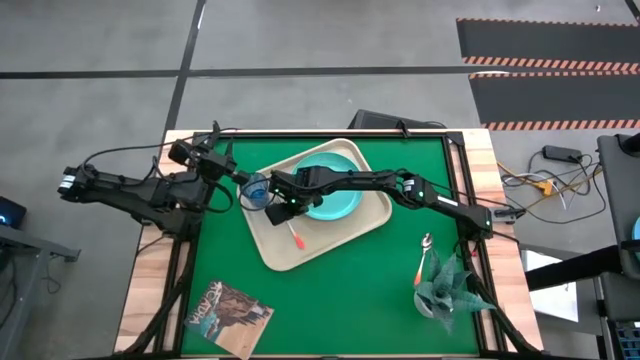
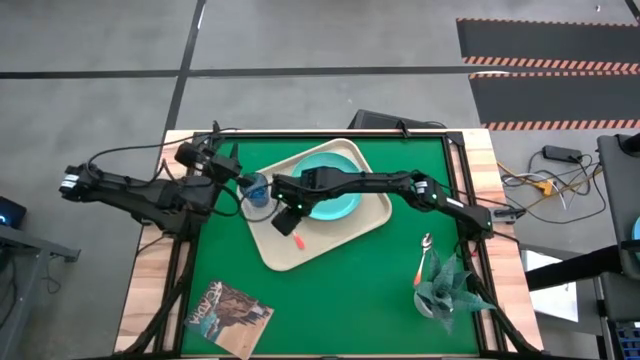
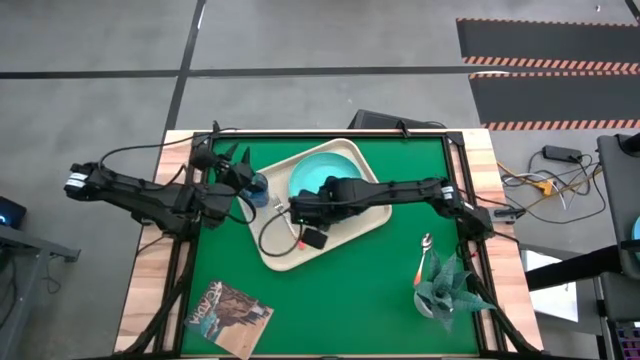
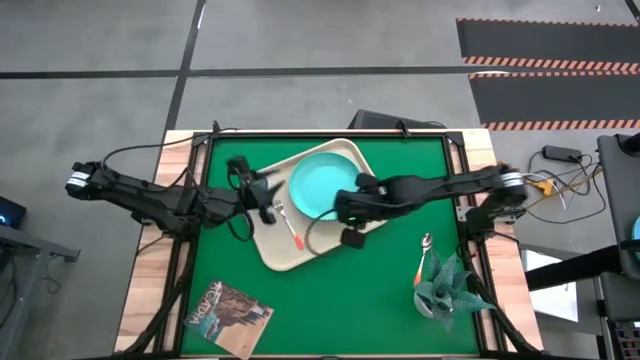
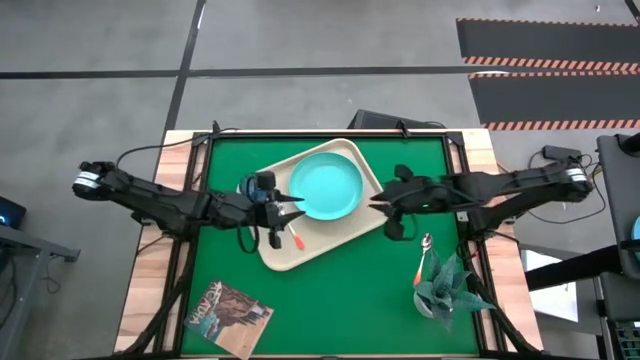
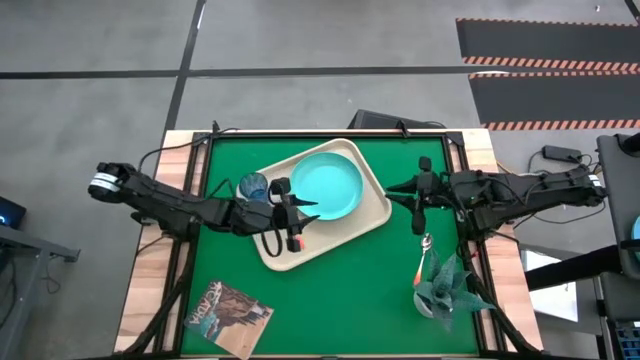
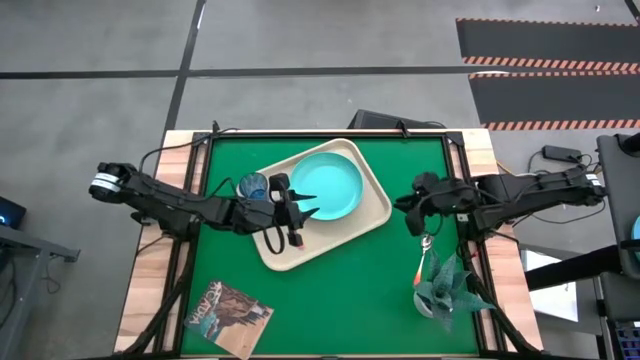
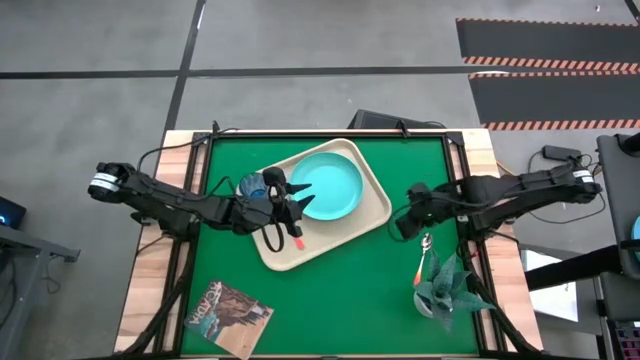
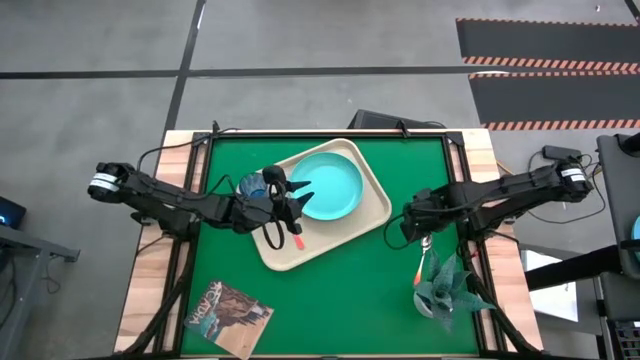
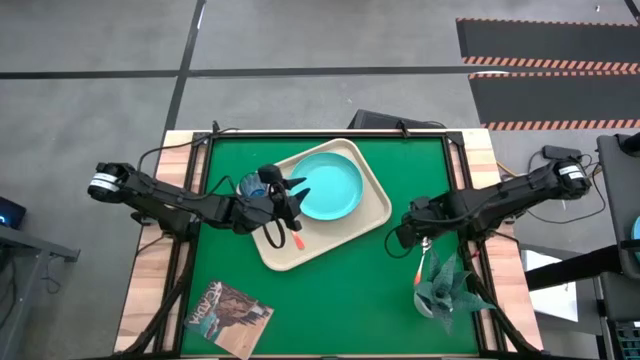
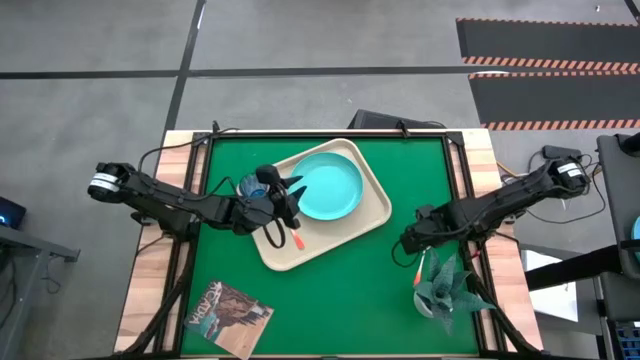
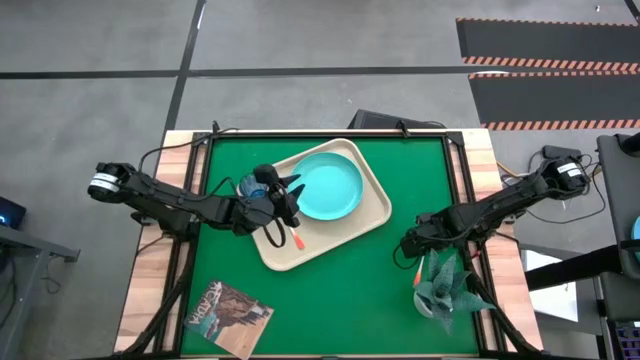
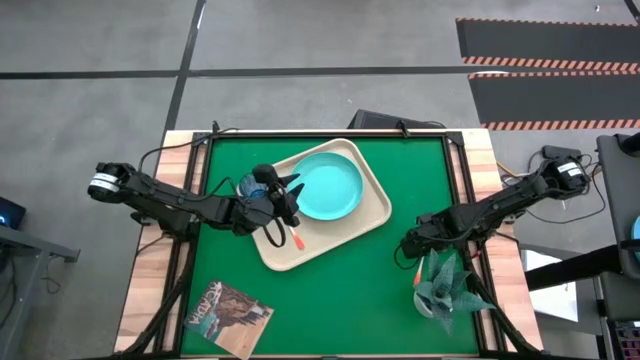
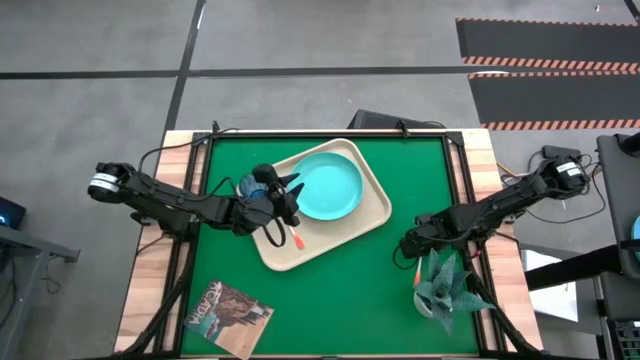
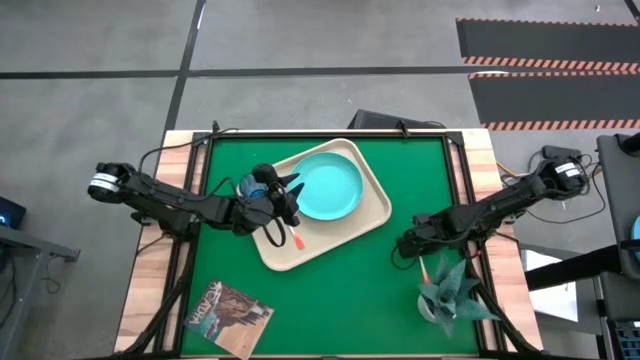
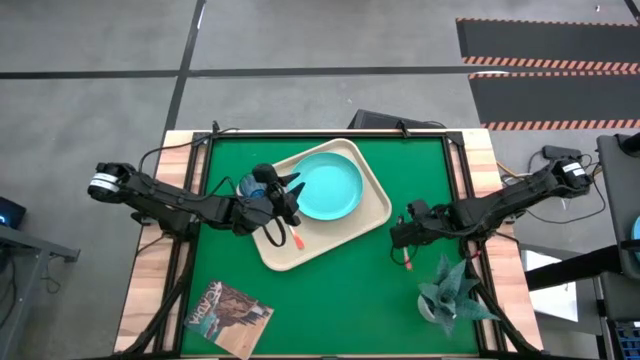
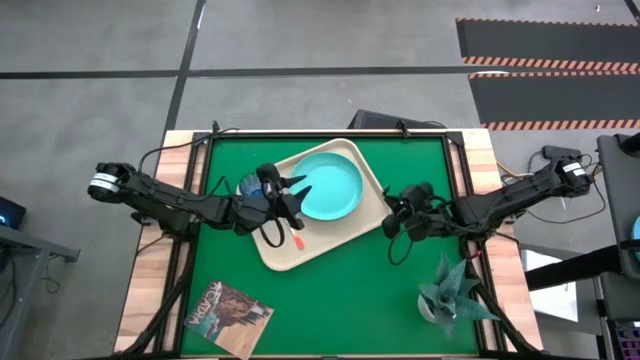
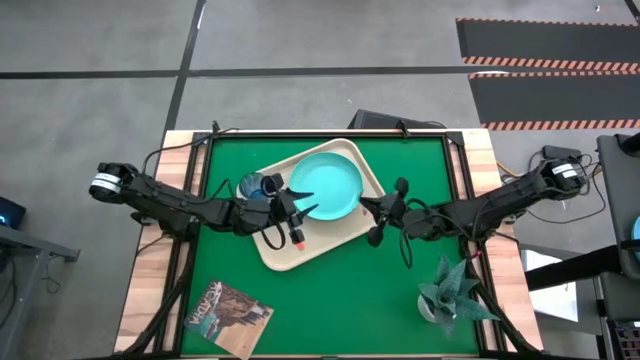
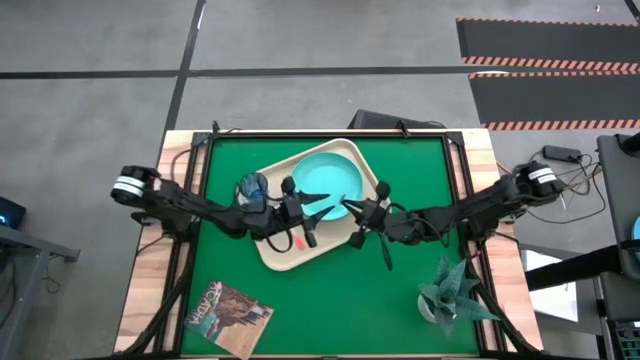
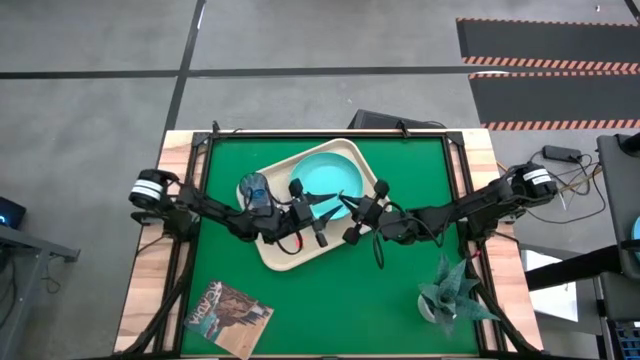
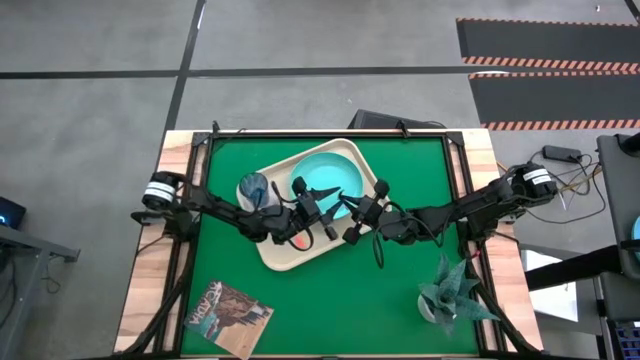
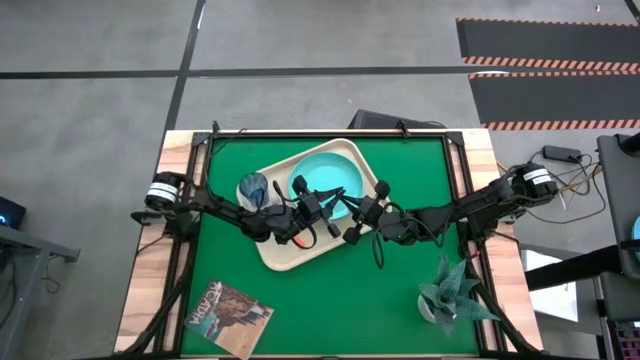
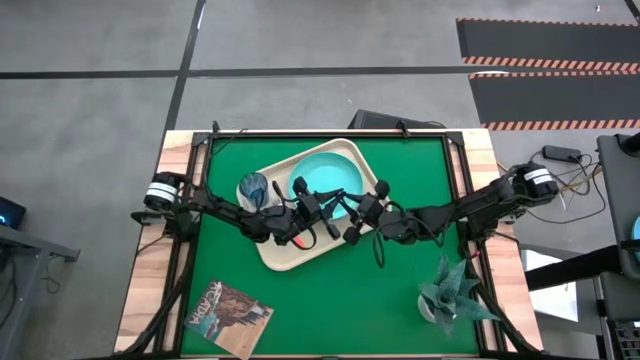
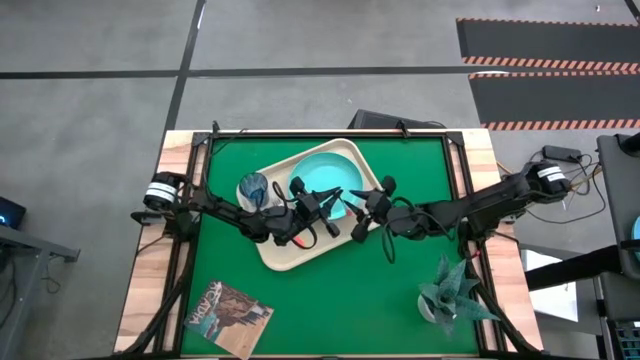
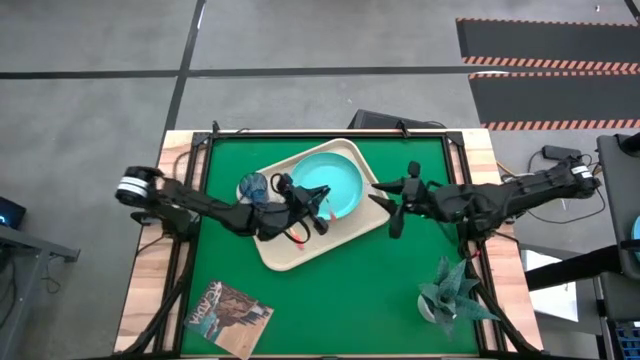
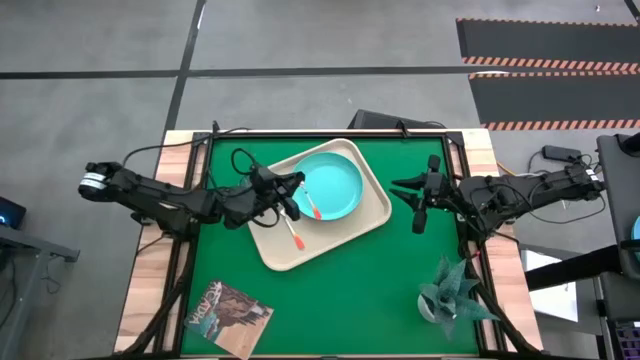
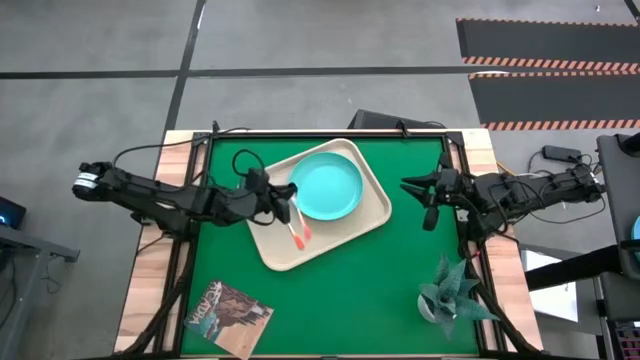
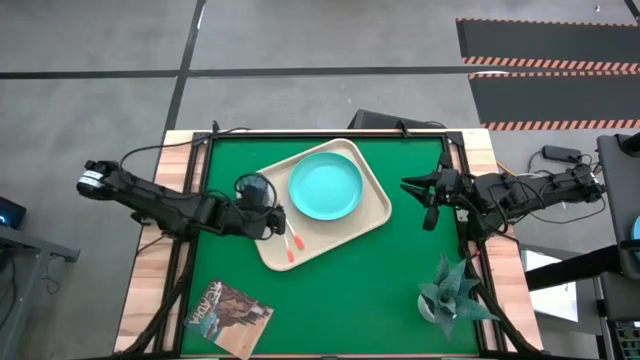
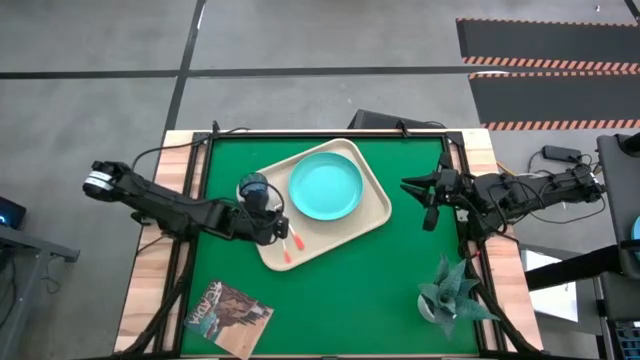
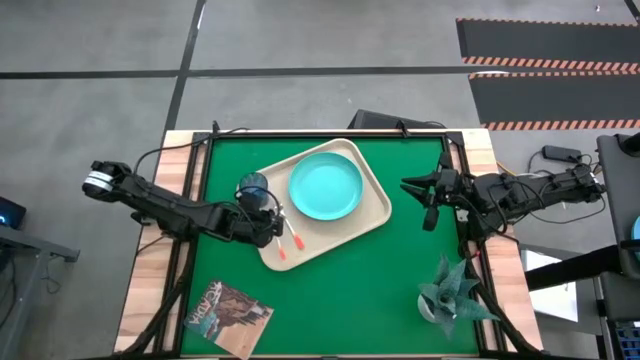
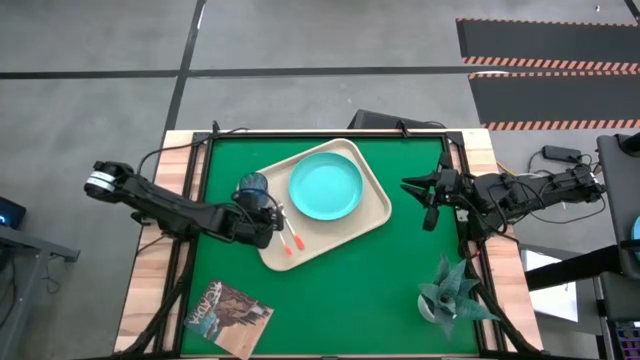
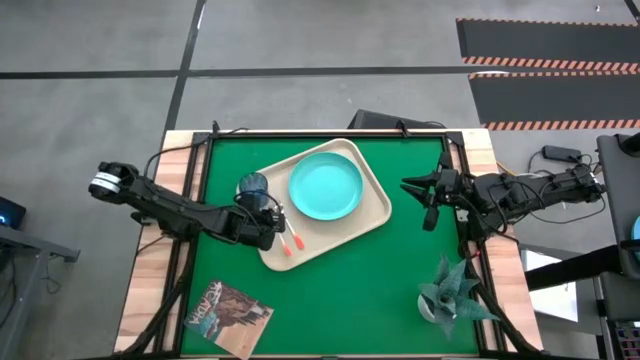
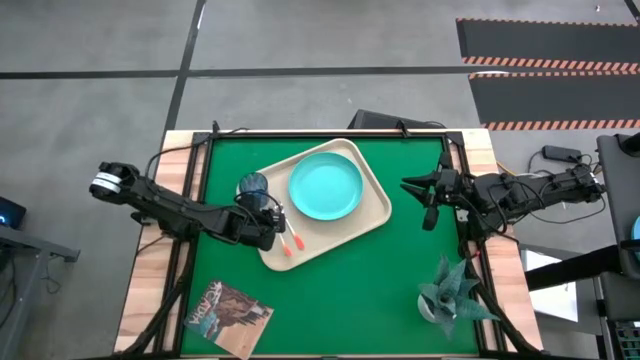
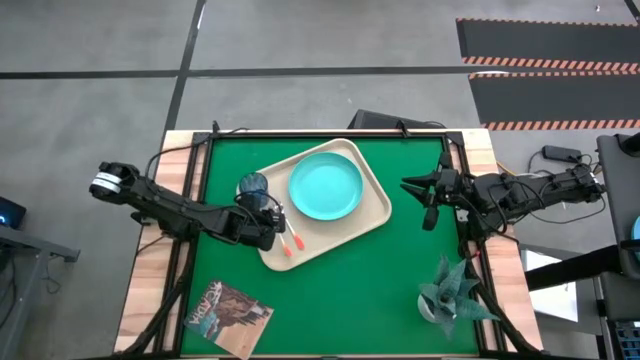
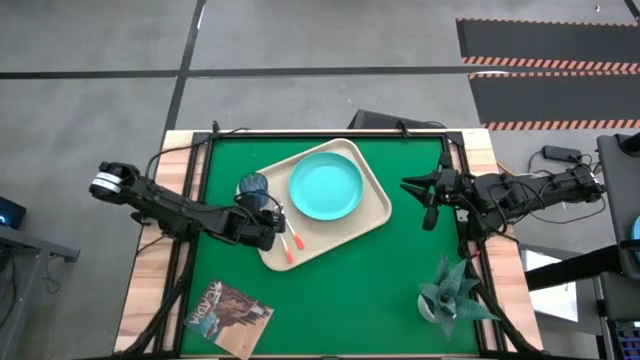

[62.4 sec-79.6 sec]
Task: Pick and place plate/cup/fork/spoon on tray
Put the orange spoon on the white tray to the left of the orange fork

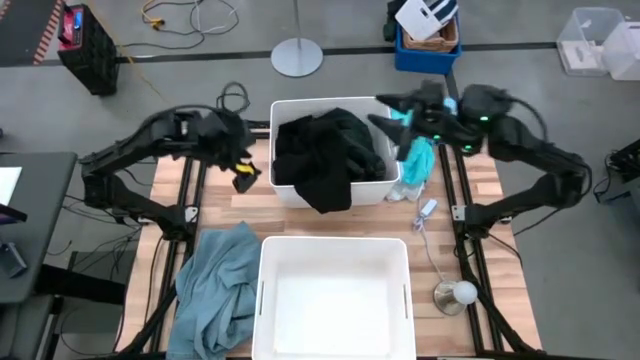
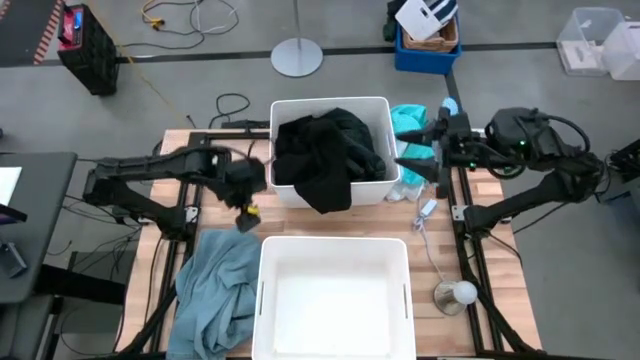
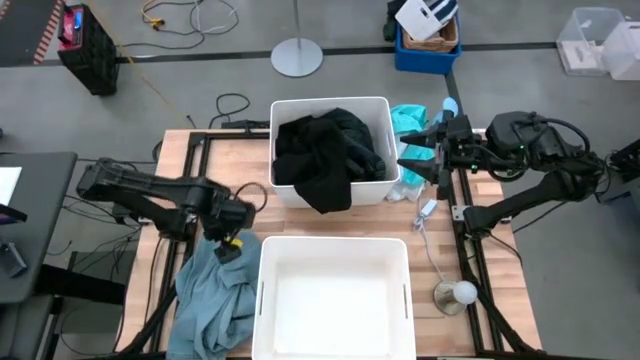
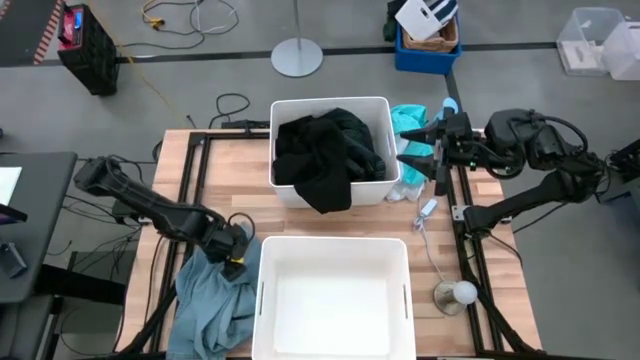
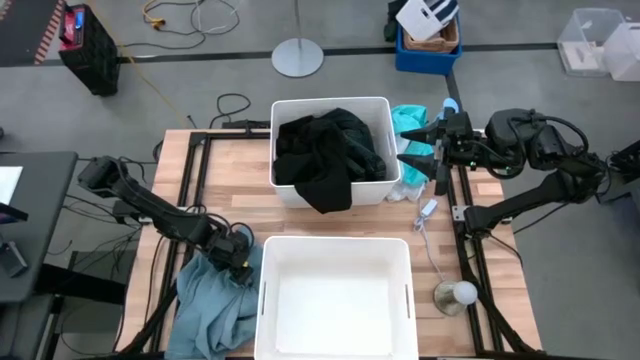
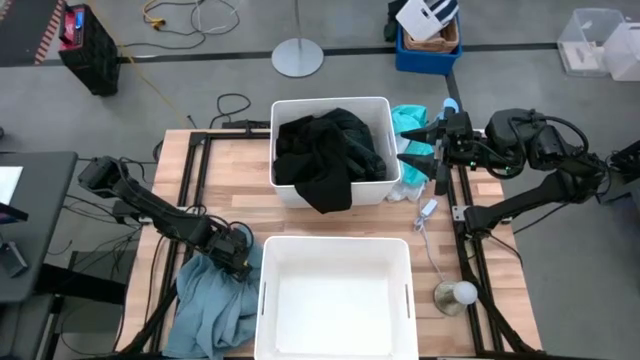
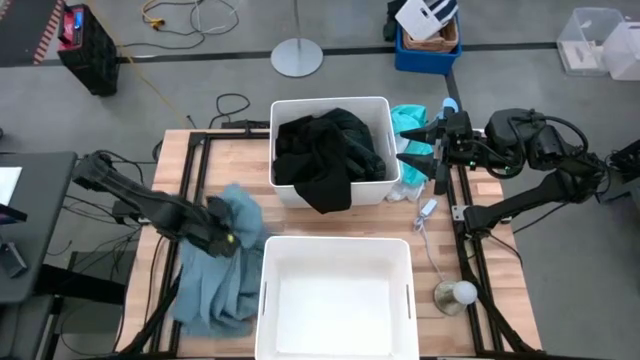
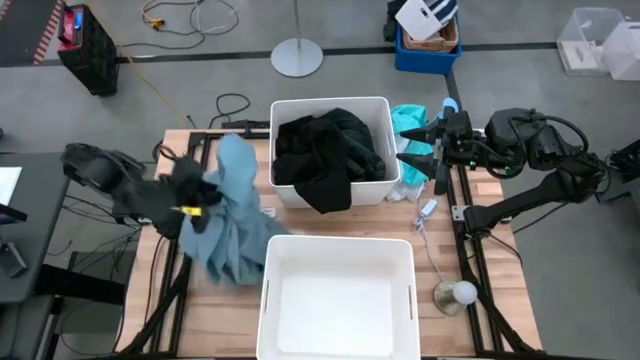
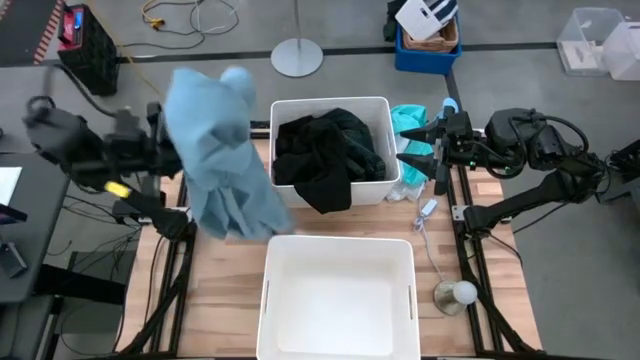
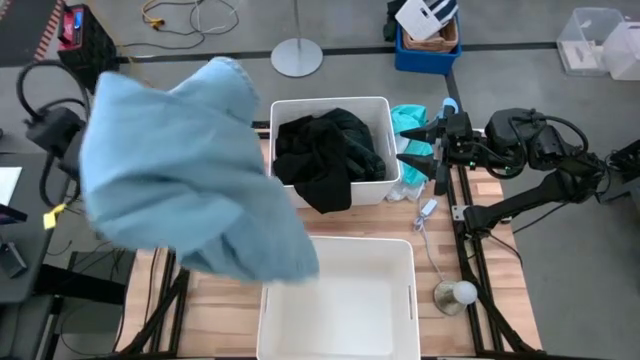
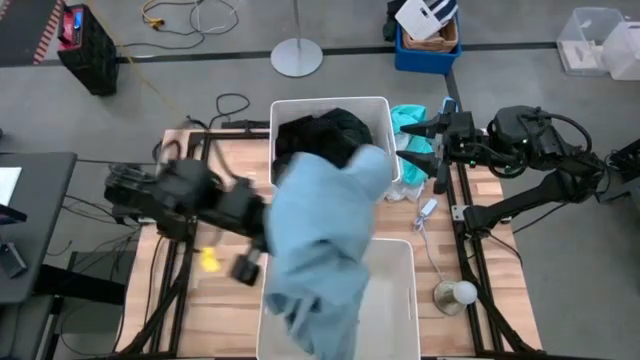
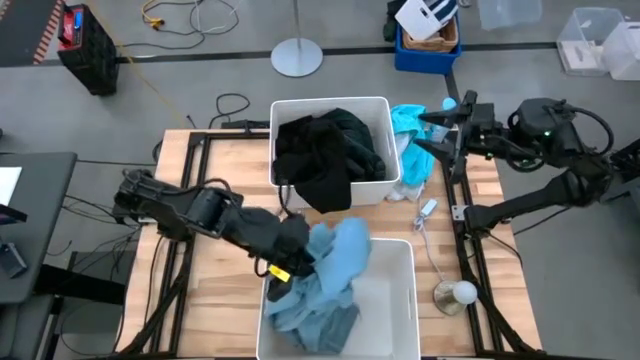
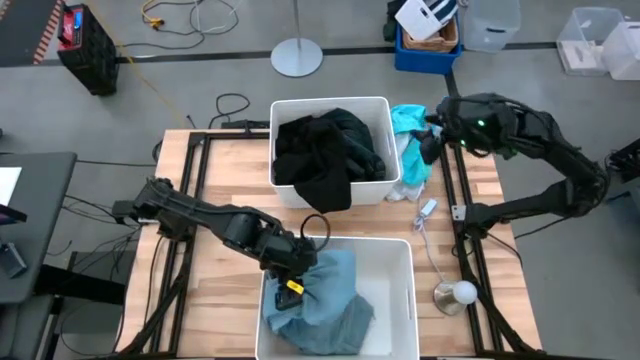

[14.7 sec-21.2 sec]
Task: Sort clothes
Put the blue pants into the bottom white bin
